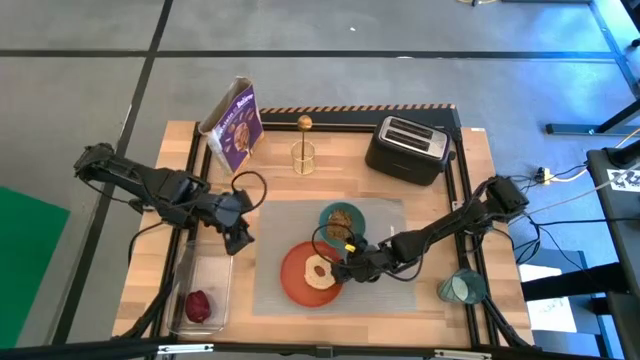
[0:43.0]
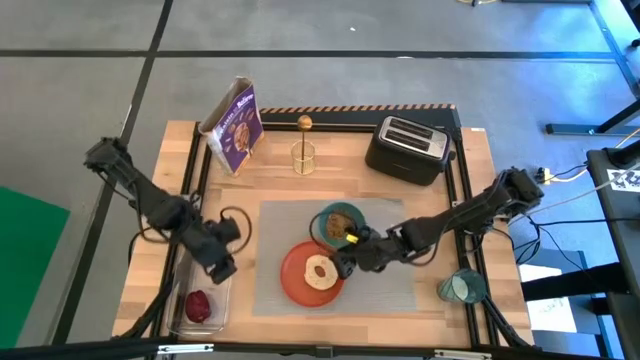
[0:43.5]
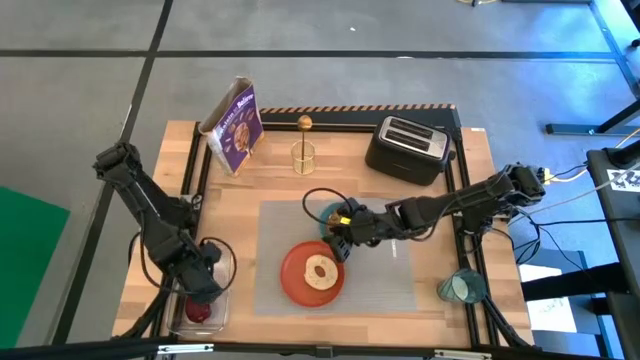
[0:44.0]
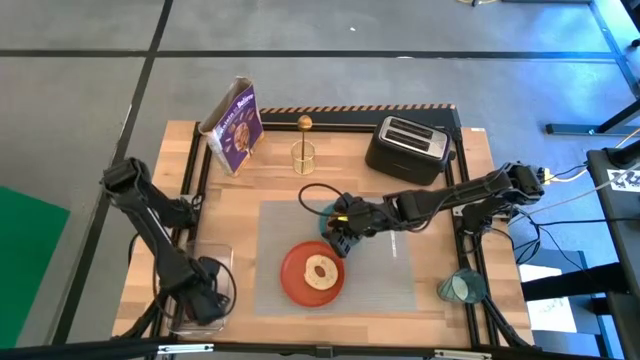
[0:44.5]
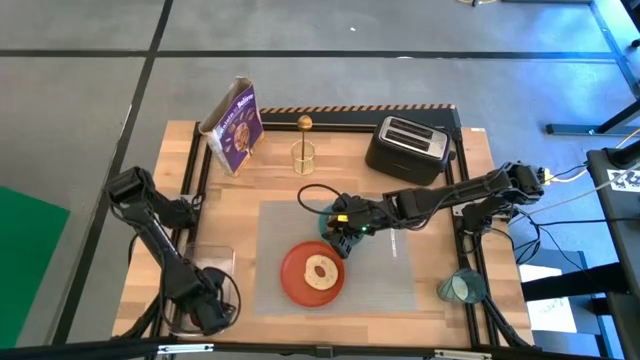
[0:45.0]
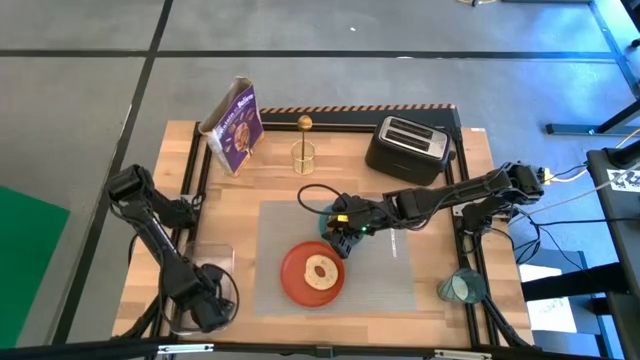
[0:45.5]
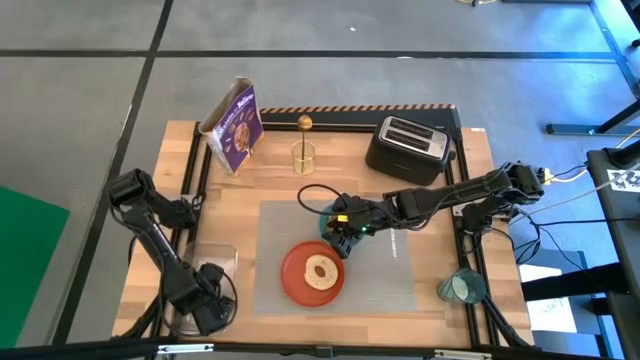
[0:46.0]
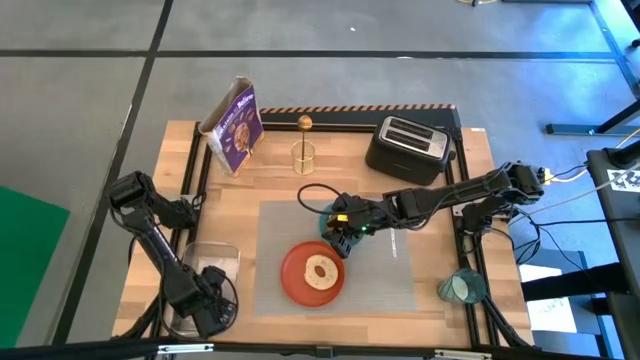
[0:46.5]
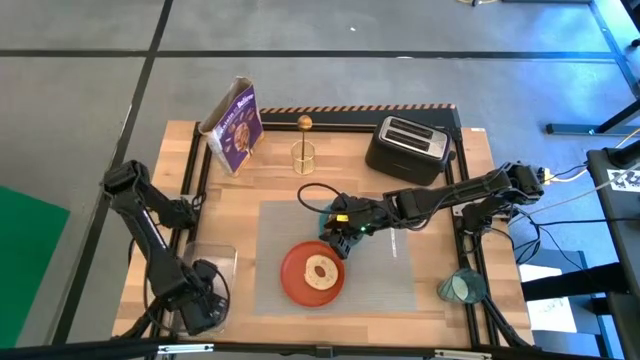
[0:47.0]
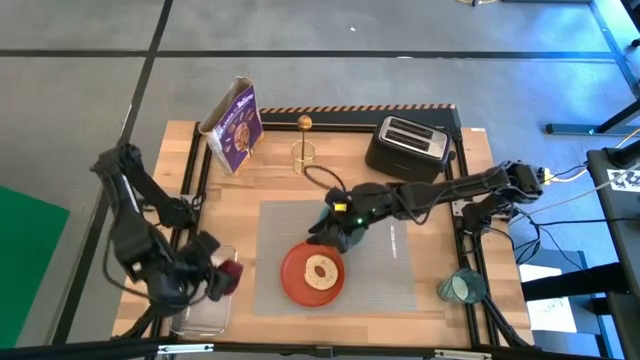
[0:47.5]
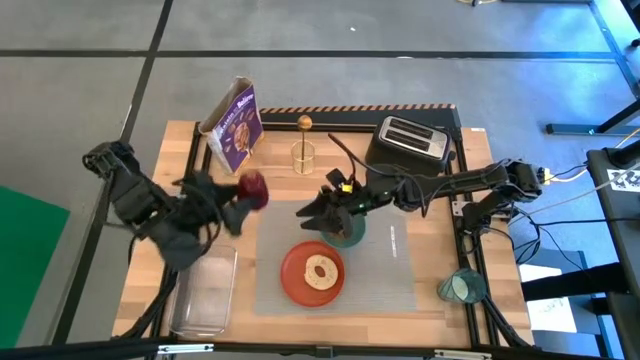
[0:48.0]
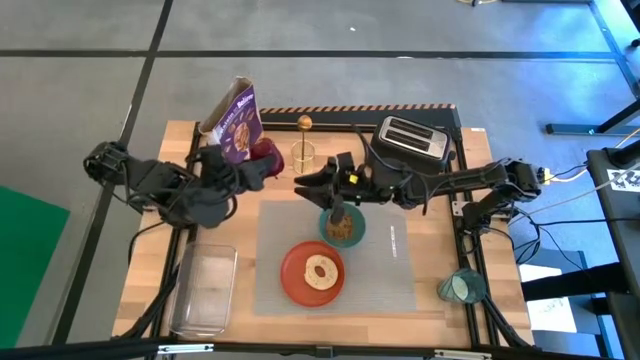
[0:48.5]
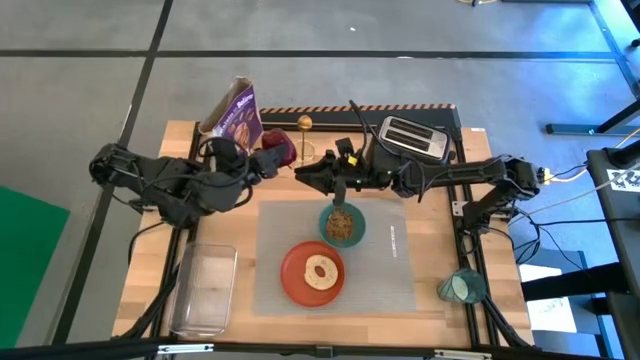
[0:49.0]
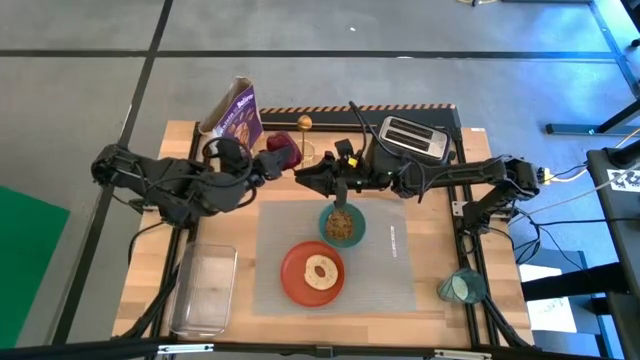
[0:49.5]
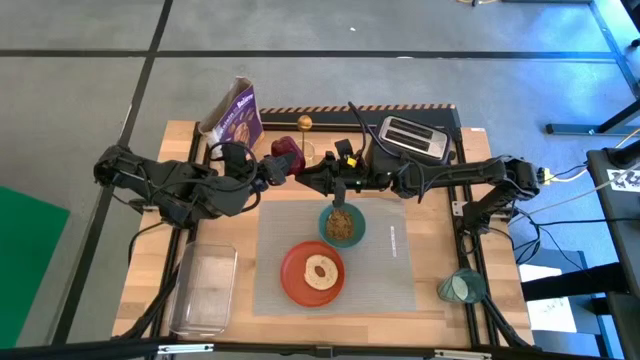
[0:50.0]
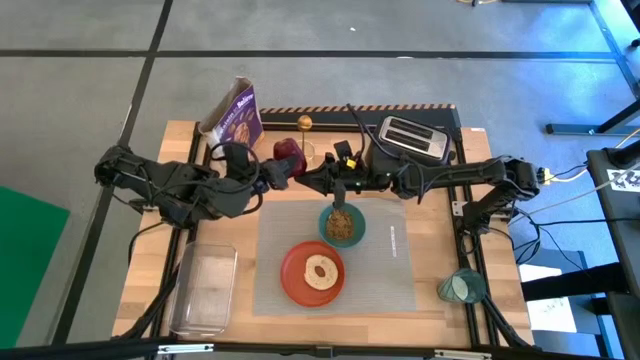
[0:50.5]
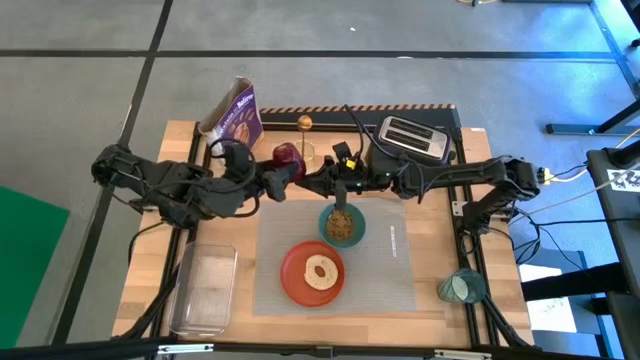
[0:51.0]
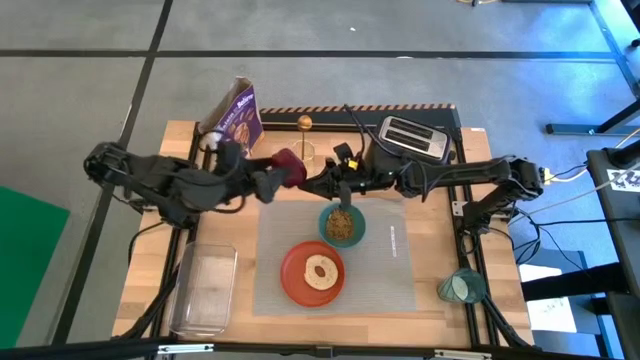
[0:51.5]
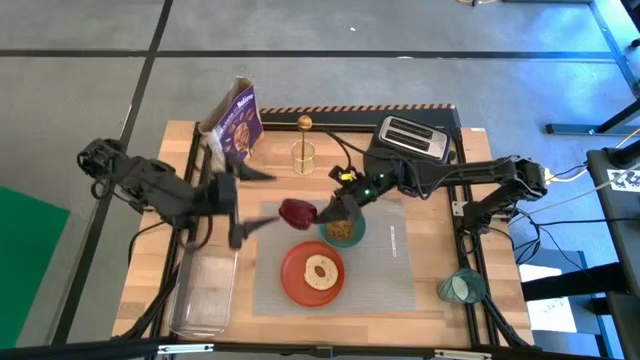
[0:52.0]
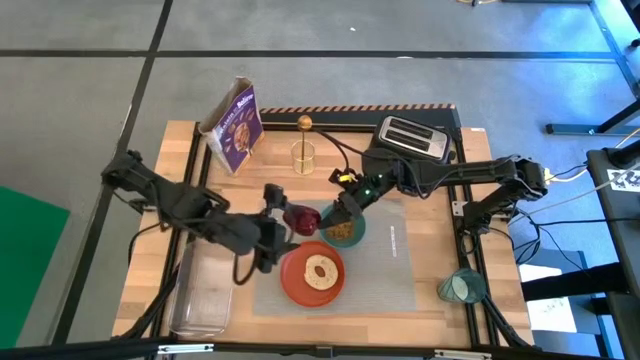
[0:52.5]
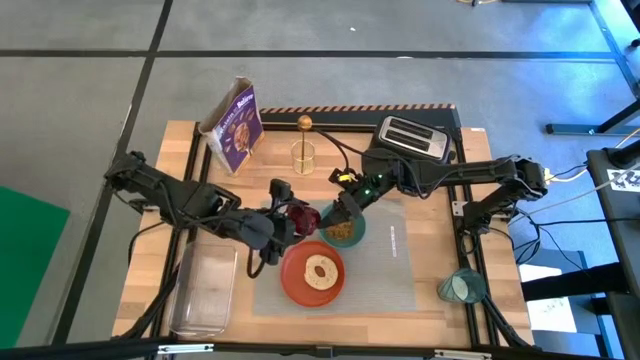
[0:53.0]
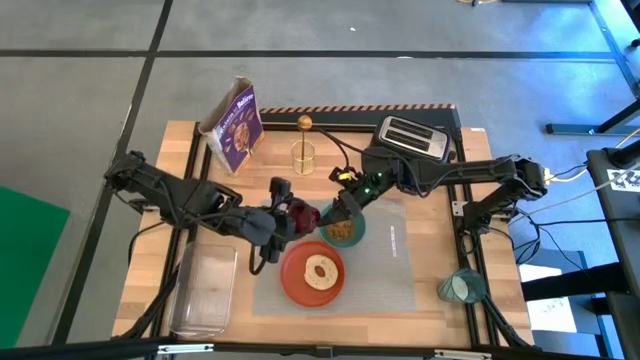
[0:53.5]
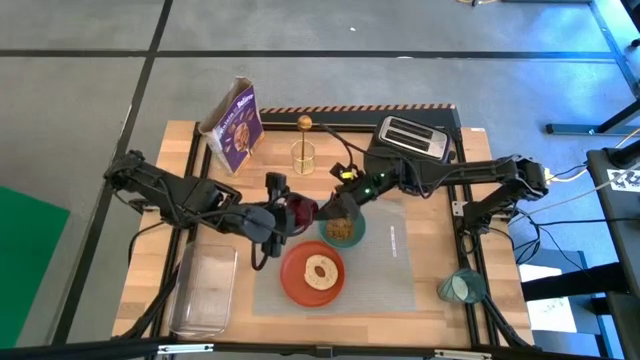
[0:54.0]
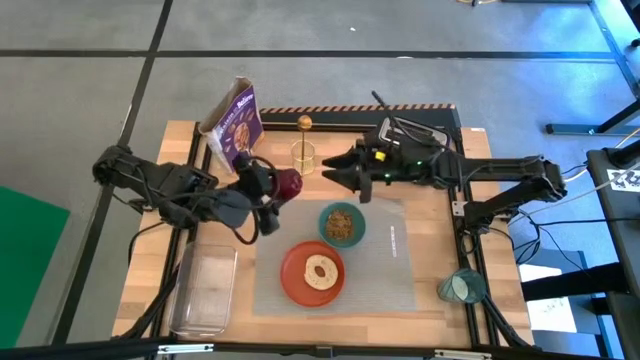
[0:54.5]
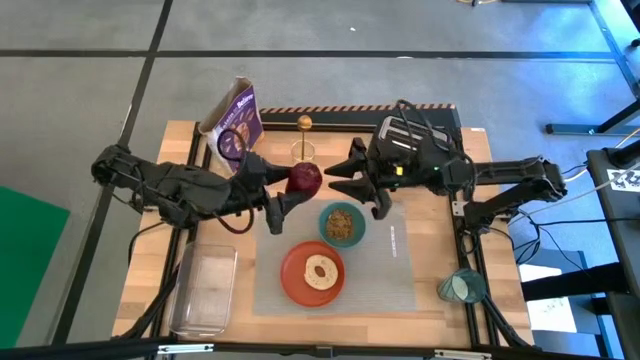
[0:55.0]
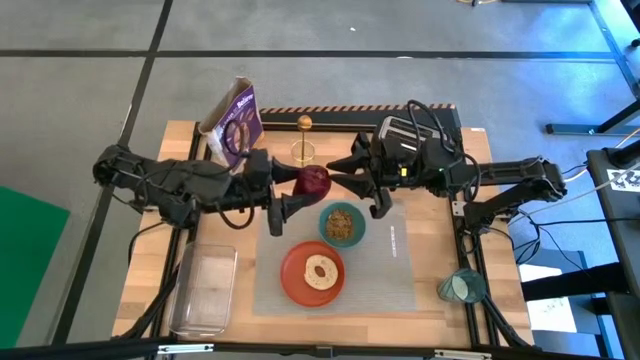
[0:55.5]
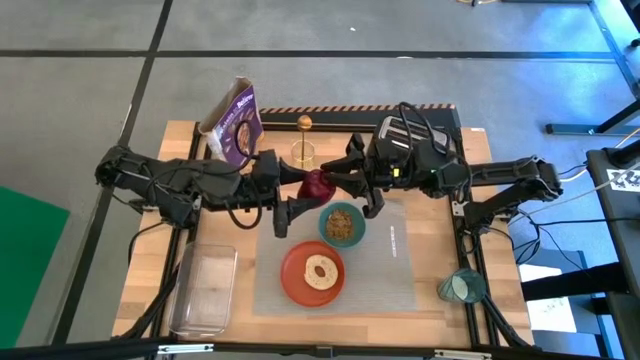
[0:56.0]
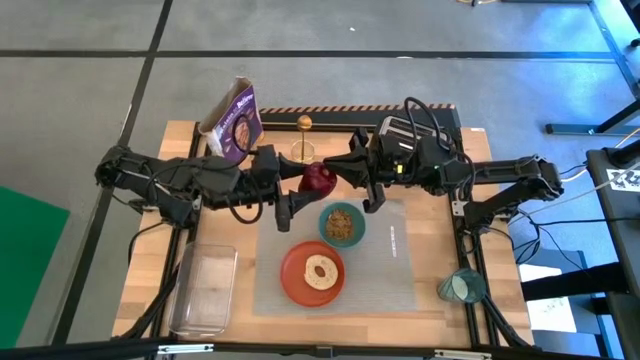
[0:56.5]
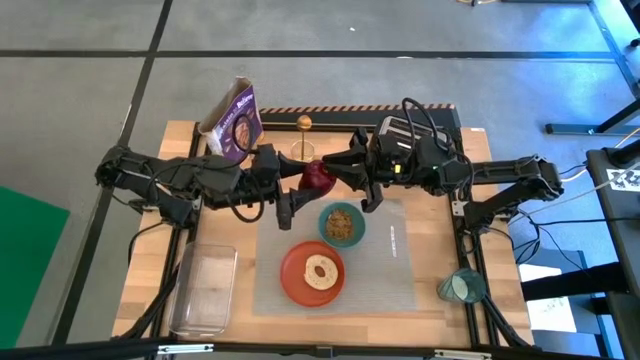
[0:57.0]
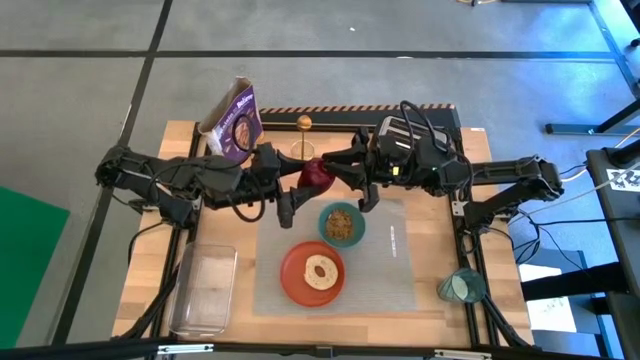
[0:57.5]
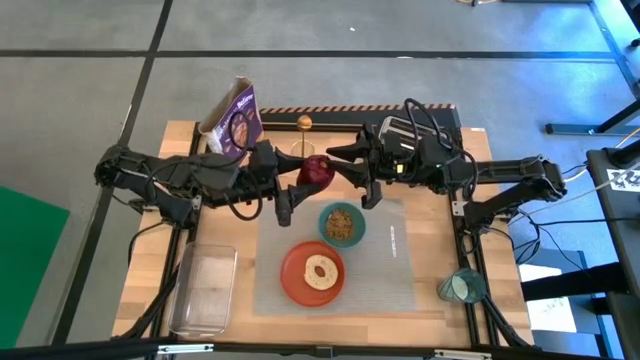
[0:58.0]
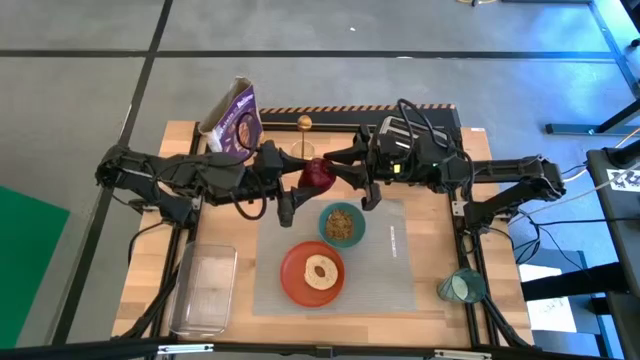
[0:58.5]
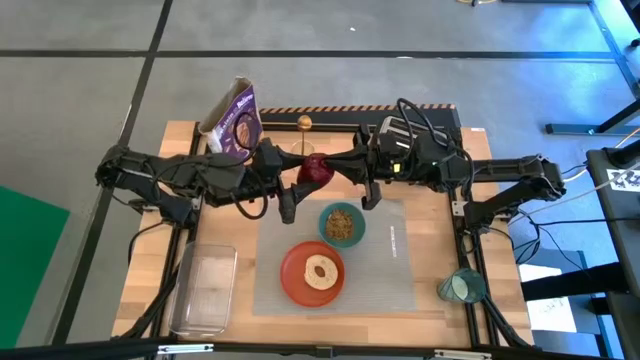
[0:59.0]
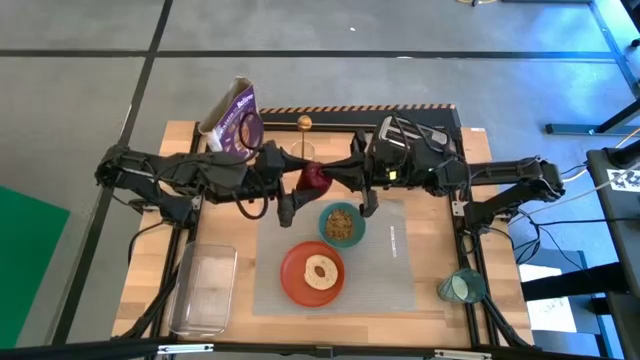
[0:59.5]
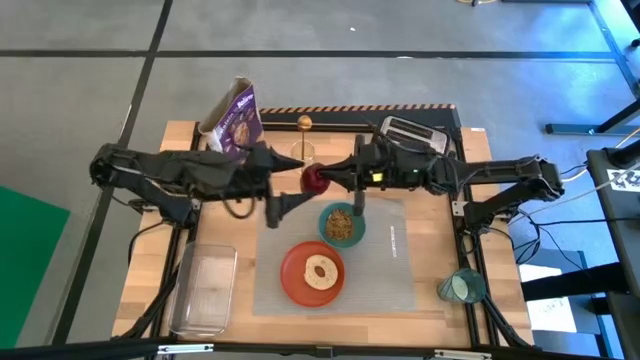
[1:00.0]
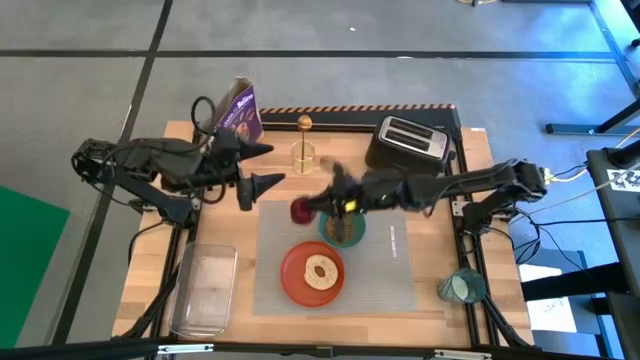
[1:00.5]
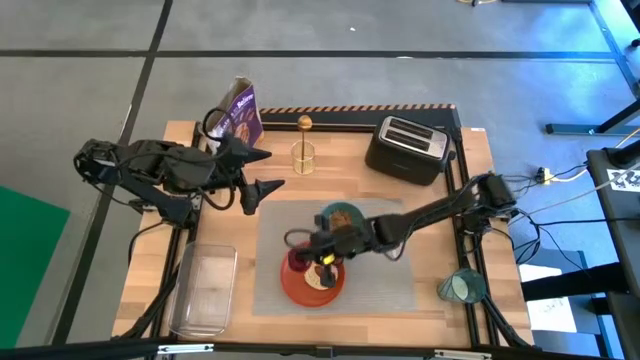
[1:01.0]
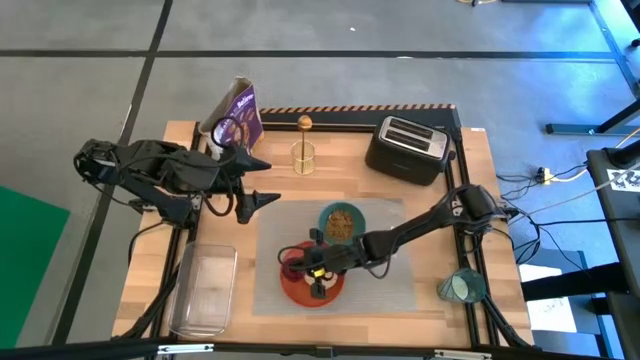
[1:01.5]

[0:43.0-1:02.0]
Task: Arrange a breakfast setting
Put the red apple on the orange plate

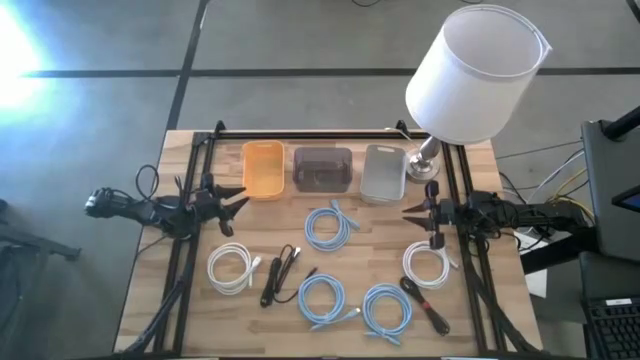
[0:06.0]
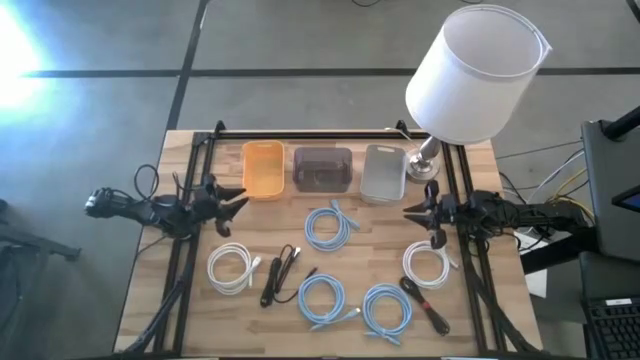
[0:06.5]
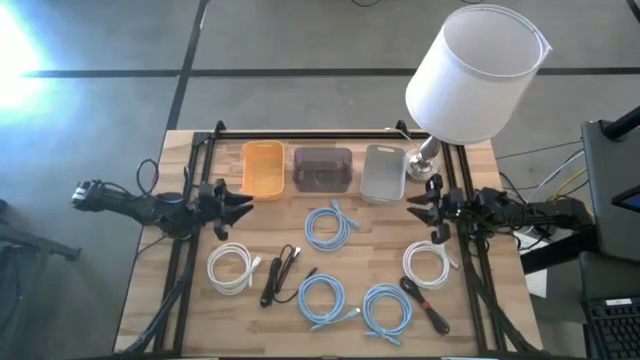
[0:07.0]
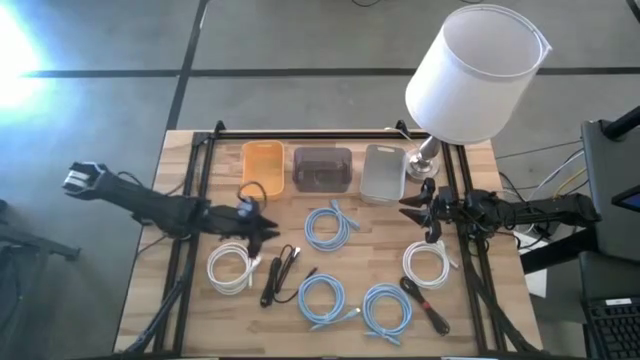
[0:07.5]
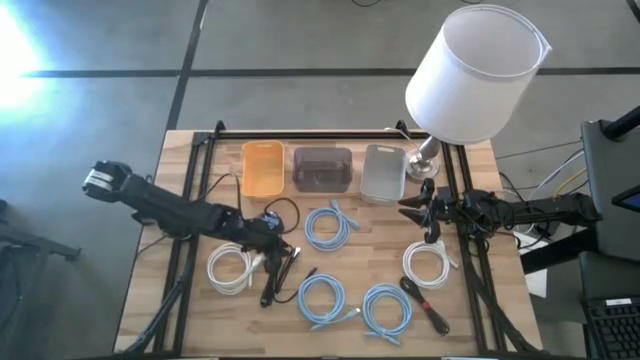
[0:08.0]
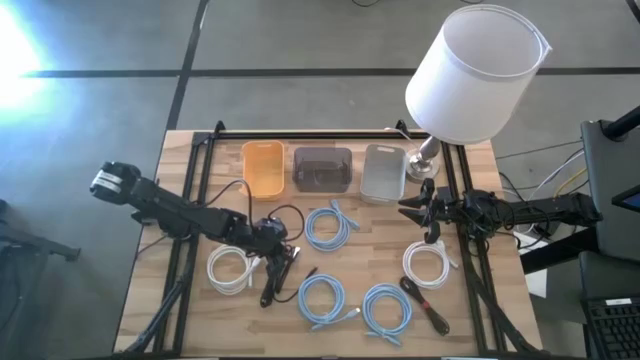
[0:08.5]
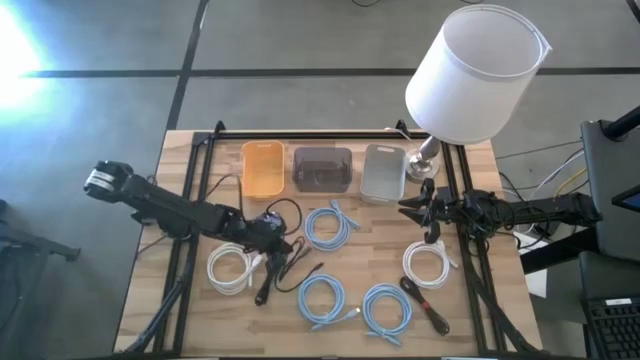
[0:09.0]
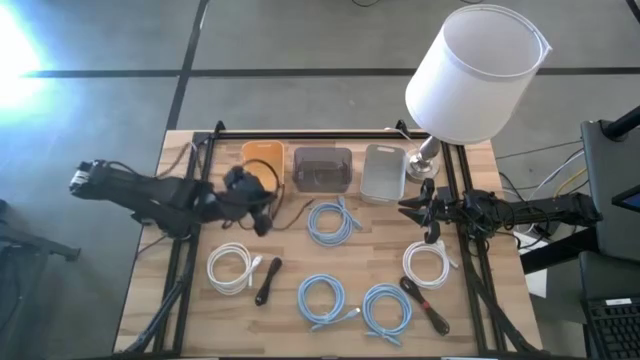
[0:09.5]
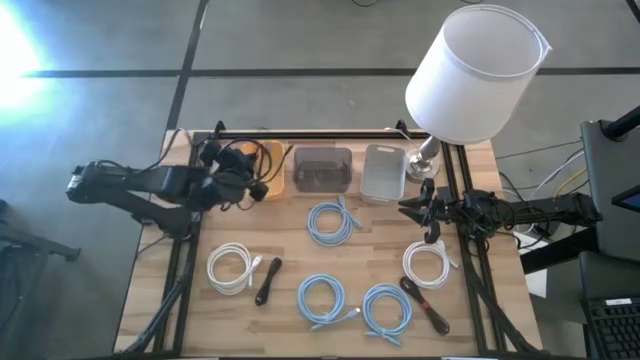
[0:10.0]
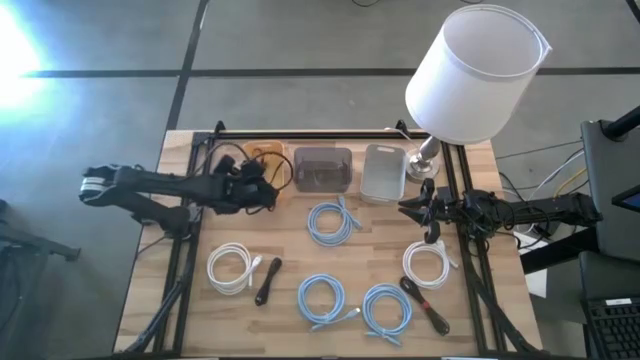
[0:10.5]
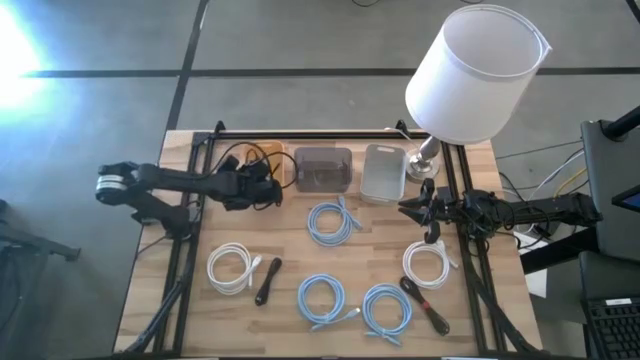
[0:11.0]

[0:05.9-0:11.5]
Task: Pick & Place USB Port
Put the middle black charger cable into the orange bin
